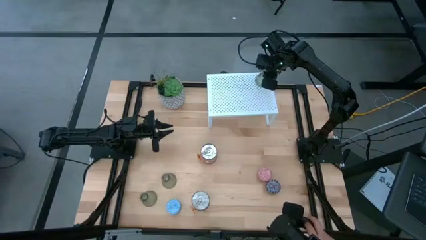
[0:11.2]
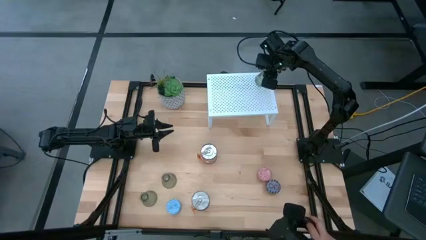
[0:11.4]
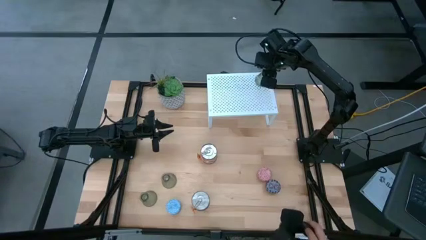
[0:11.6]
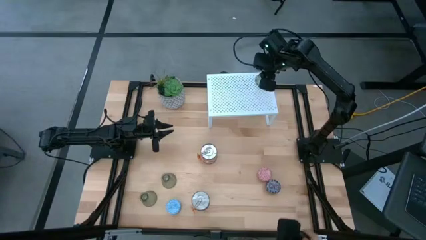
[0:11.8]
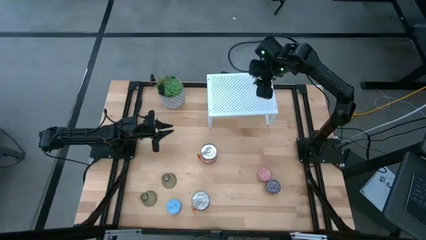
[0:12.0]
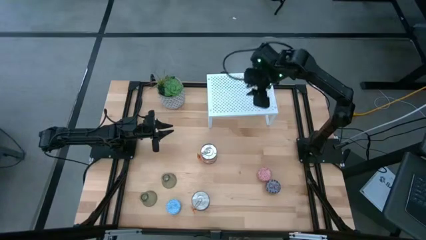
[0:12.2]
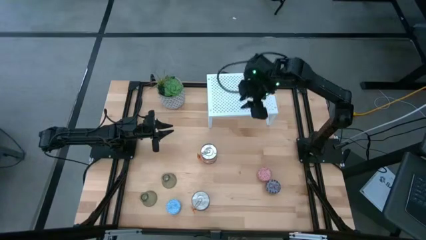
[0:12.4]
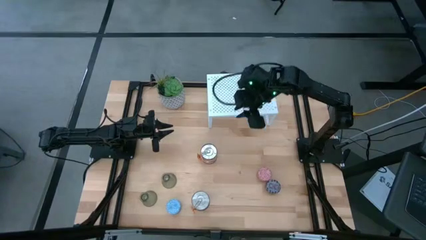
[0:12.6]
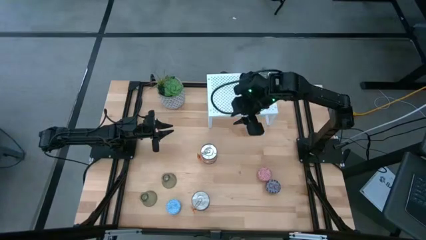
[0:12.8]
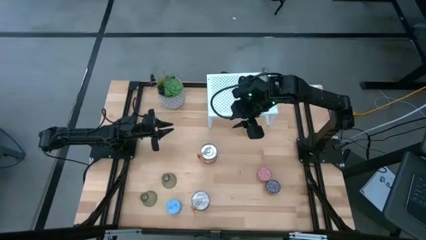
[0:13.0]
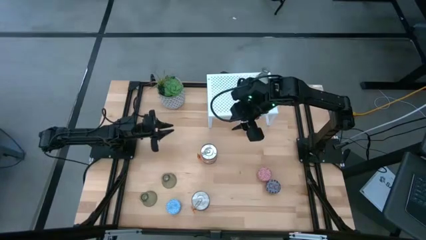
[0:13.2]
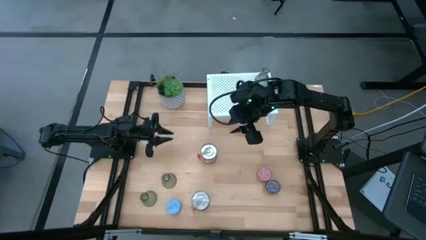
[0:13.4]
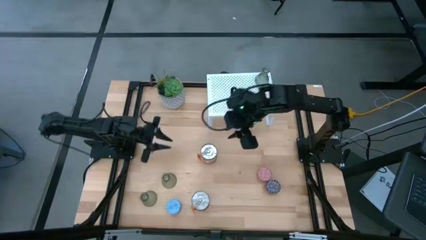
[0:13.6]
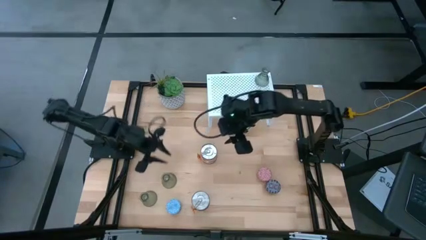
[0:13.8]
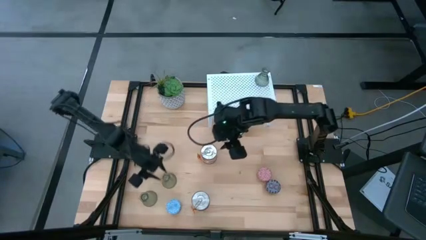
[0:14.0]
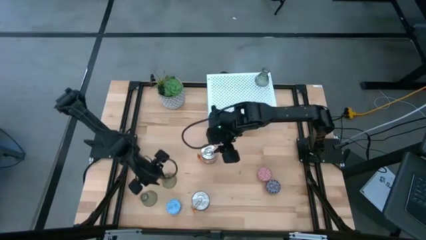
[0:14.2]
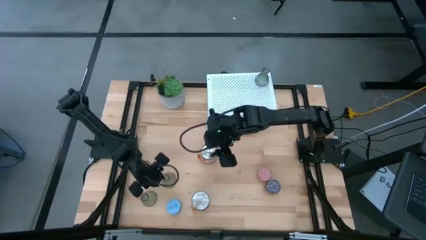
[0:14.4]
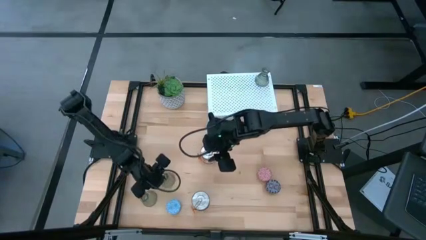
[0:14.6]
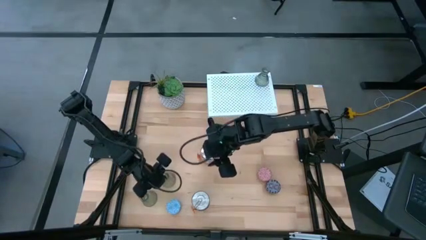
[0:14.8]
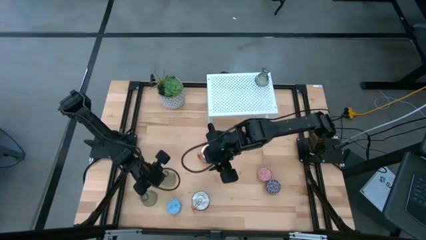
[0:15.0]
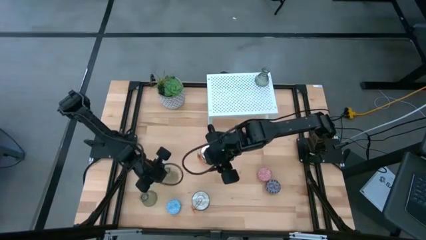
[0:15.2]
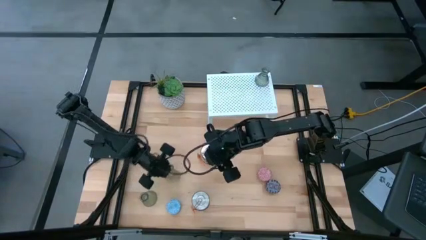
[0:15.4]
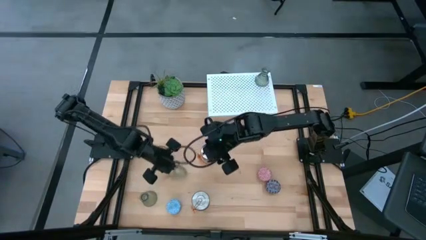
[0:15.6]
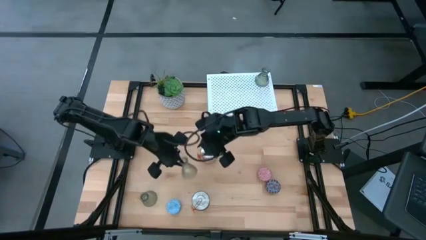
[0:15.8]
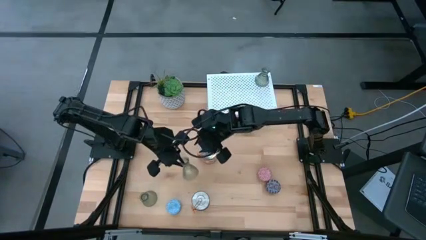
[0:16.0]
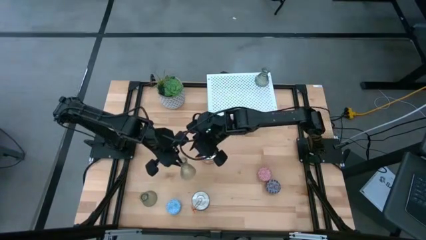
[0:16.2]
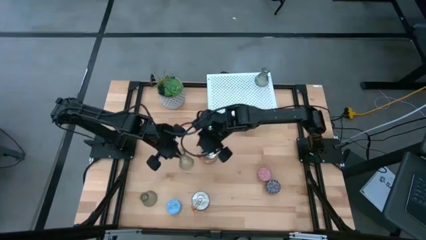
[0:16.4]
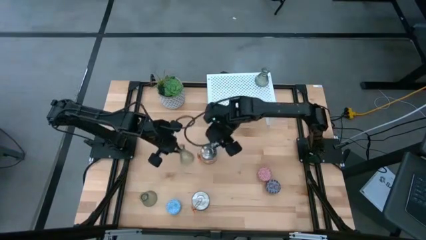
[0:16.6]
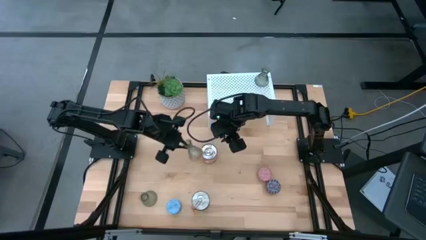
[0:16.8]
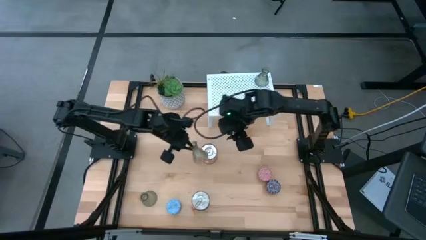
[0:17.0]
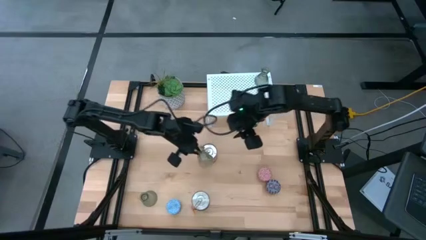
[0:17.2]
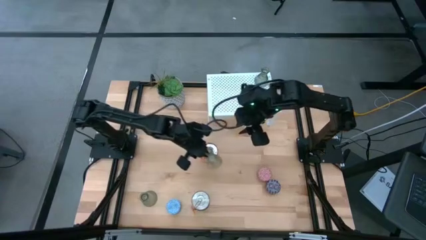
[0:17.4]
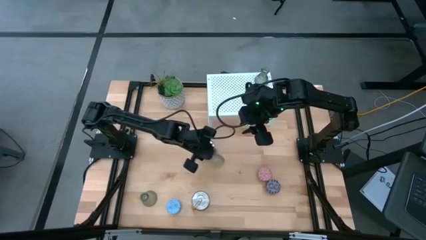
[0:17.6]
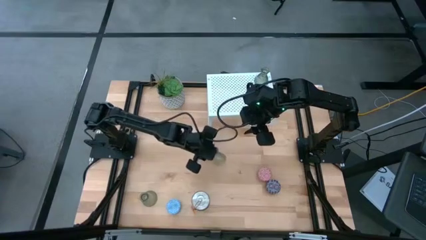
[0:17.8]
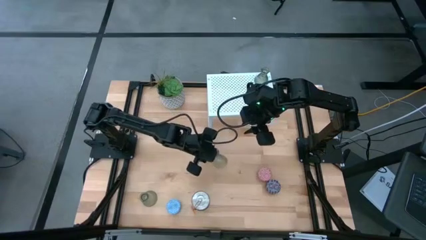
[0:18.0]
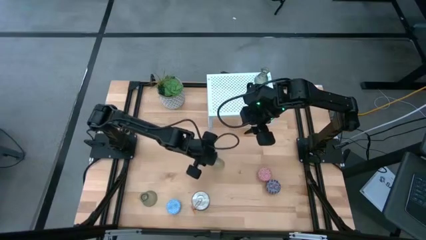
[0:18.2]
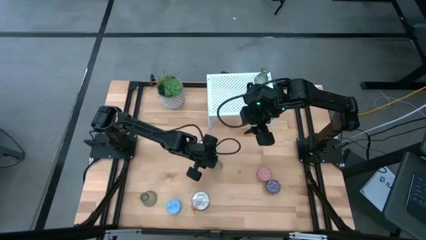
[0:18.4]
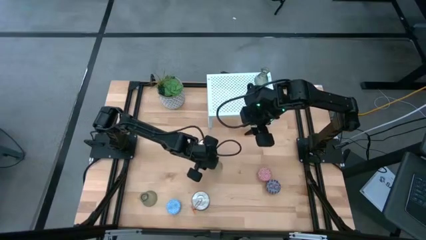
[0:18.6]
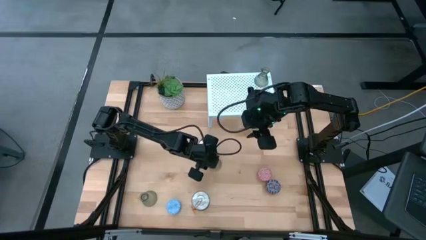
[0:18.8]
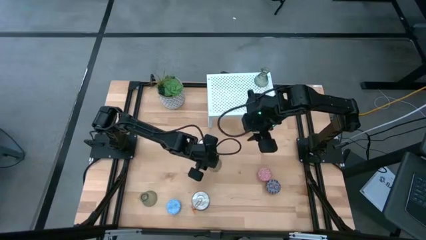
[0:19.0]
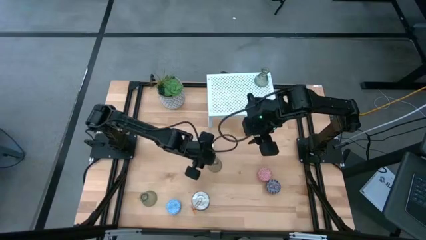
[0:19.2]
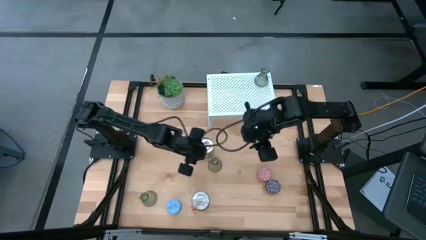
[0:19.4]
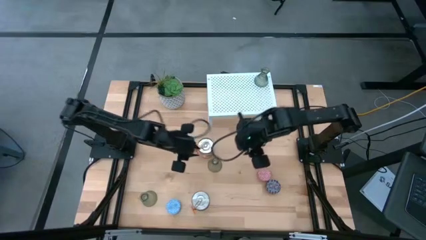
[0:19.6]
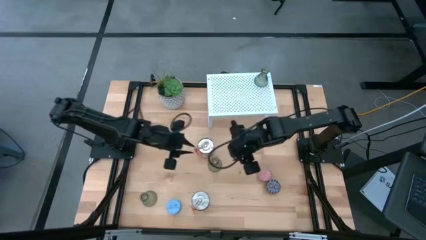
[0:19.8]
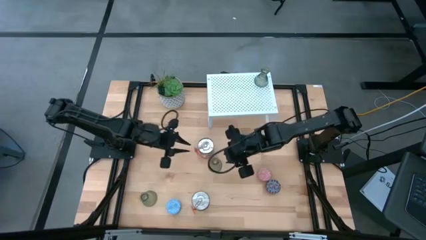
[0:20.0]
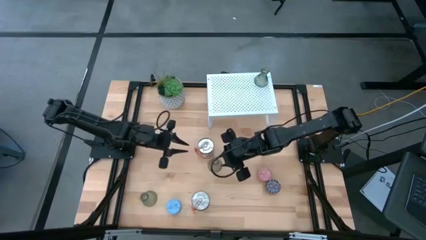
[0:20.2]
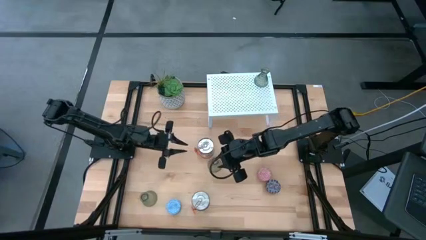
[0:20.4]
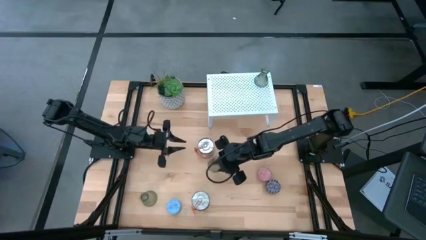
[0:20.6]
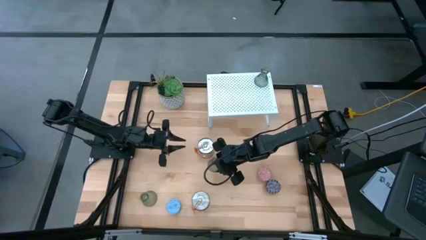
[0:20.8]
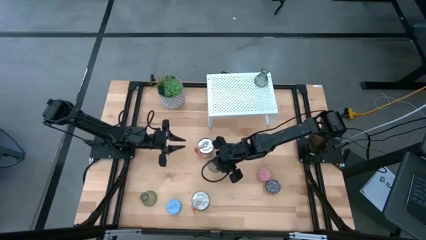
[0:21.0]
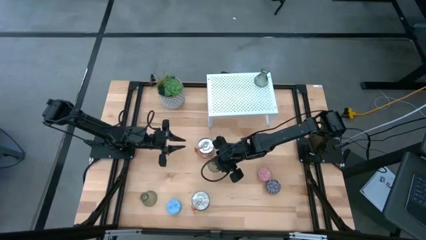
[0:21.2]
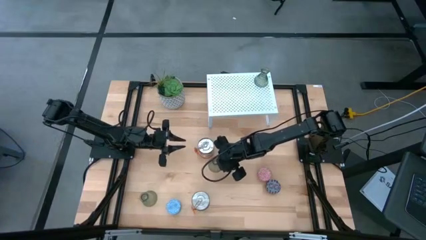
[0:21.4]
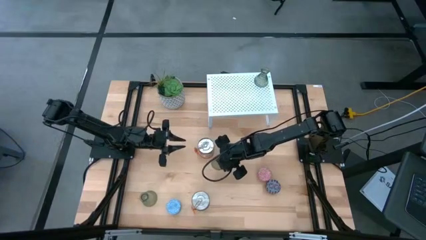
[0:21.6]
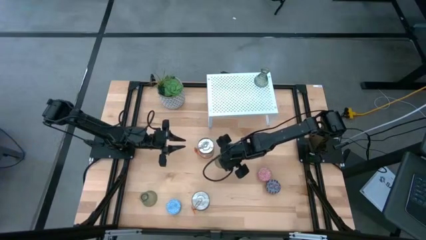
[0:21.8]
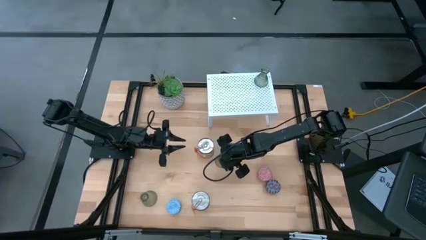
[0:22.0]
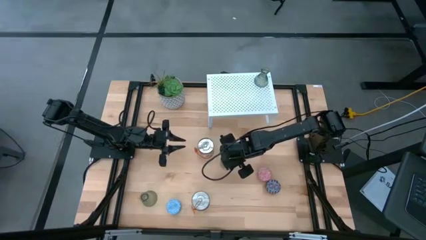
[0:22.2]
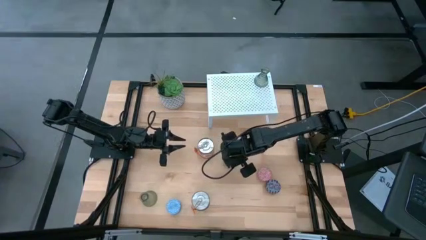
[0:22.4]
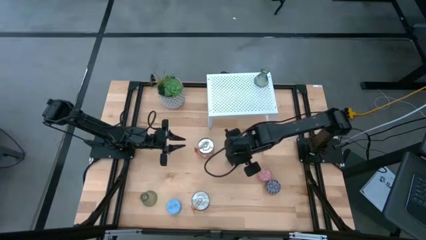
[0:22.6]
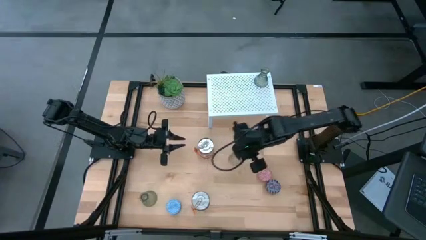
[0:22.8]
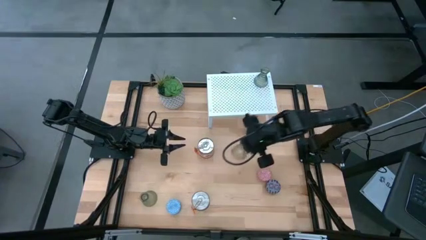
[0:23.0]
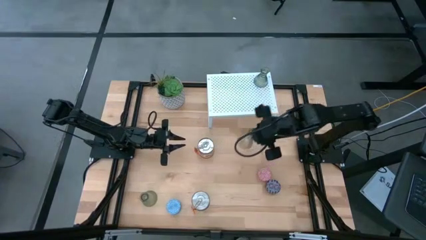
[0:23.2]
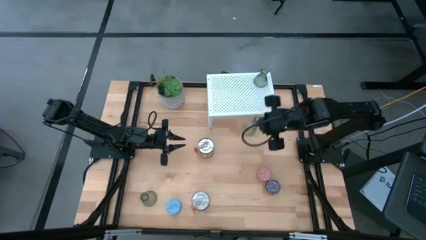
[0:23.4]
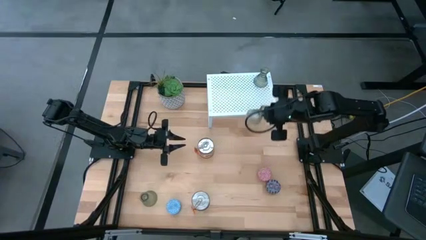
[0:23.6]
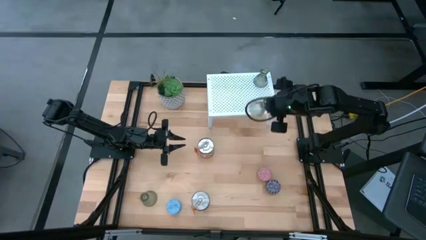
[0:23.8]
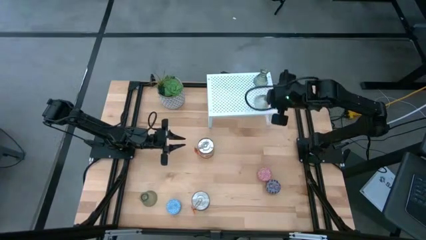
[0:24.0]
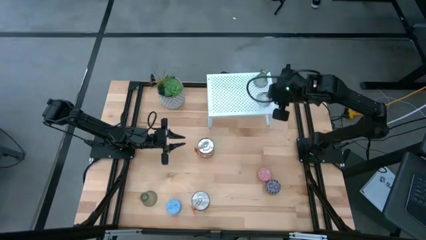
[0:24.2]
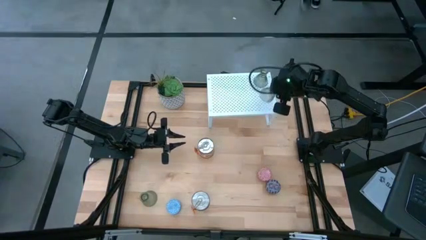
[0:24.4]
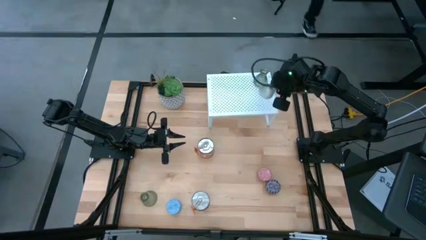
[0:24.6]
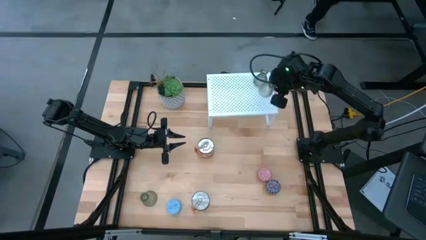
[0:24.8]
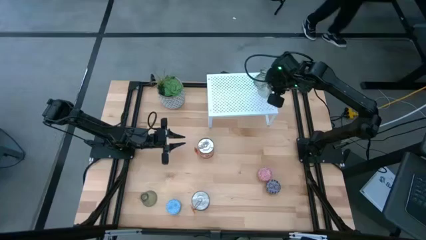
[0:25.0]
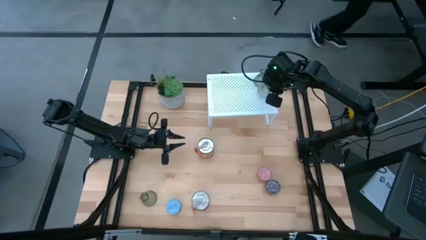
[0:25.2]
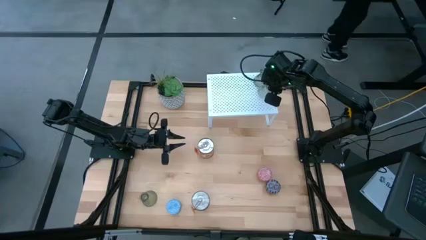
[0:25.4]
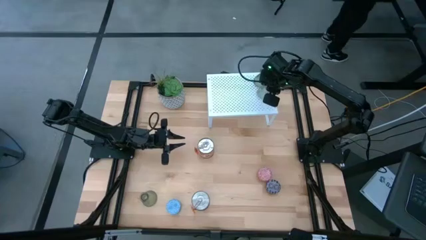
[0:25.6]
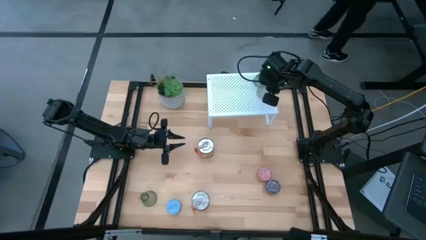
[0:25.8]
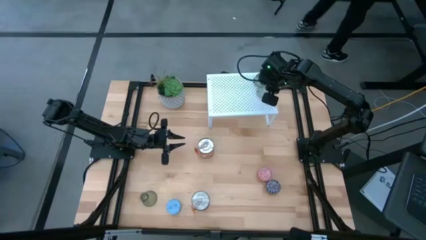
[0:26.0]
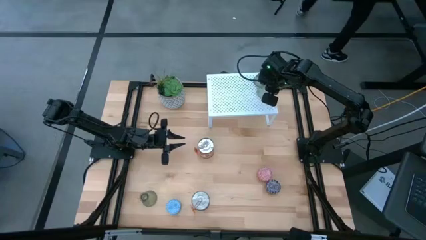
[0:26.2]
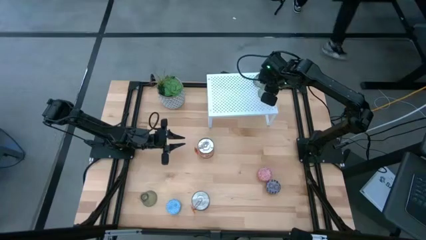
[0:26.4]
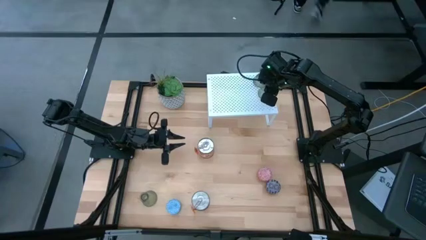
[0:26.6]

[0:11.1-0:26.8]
Task: Pick & Place candle stick holders
Put the top green glass candle holder on the shelf aligned with the other glass candle holder
